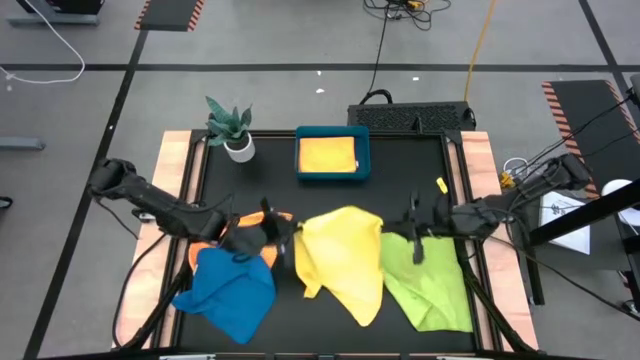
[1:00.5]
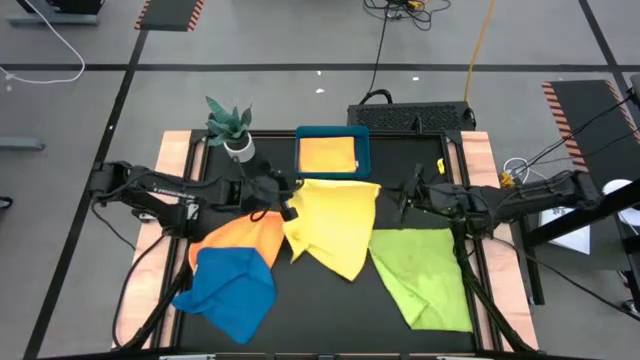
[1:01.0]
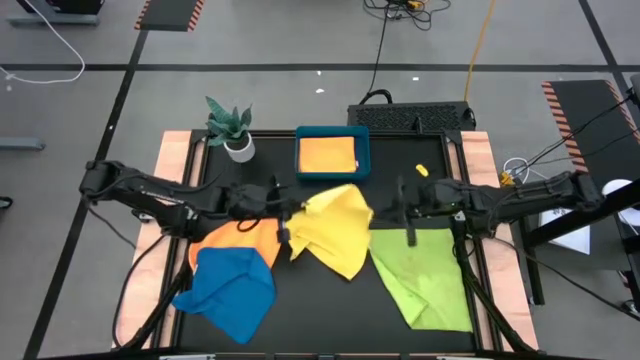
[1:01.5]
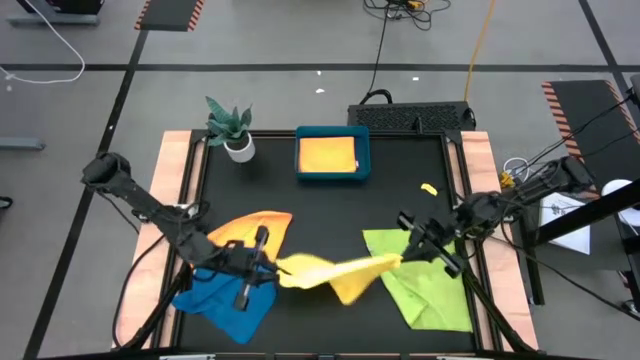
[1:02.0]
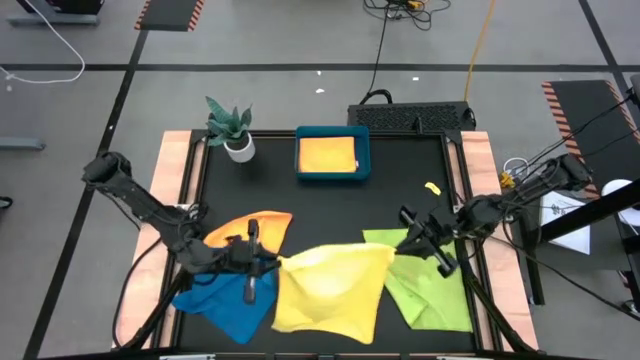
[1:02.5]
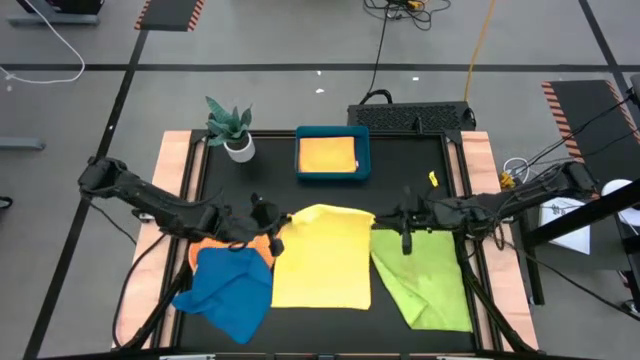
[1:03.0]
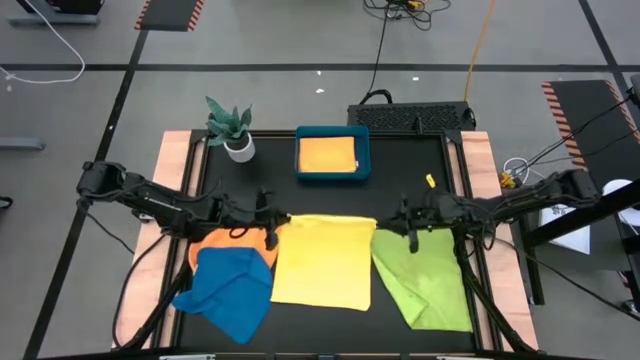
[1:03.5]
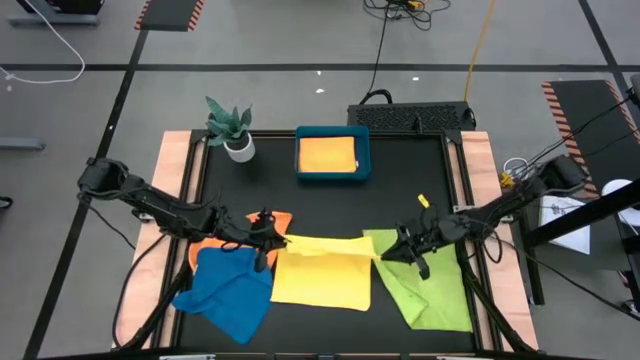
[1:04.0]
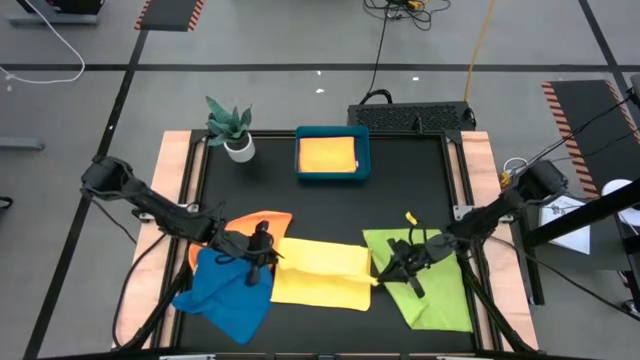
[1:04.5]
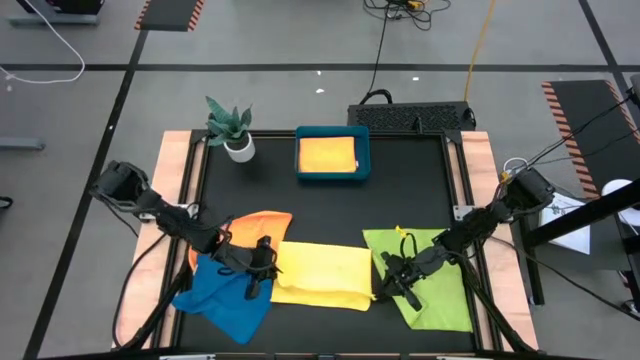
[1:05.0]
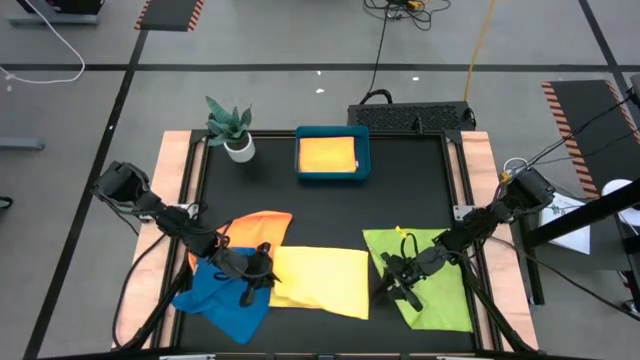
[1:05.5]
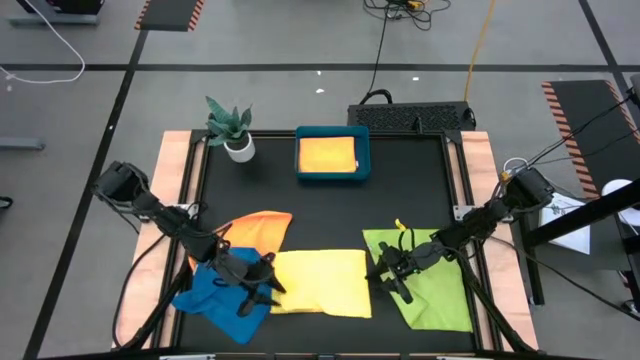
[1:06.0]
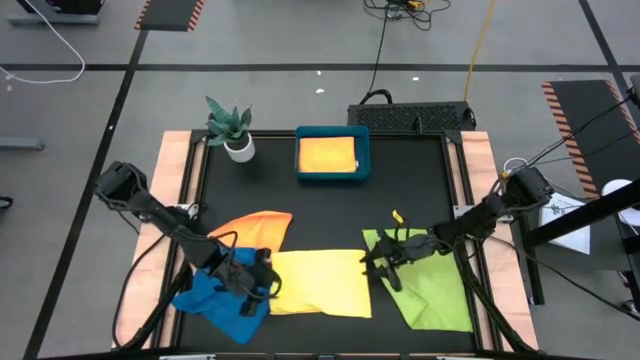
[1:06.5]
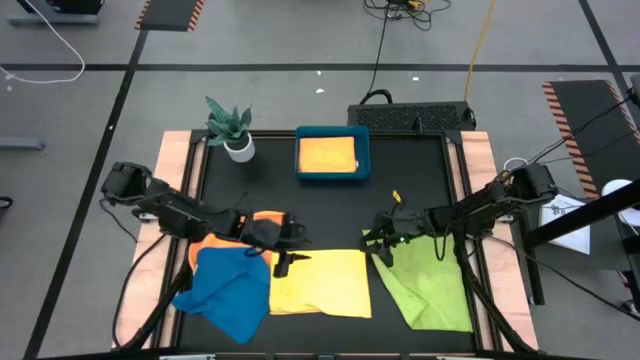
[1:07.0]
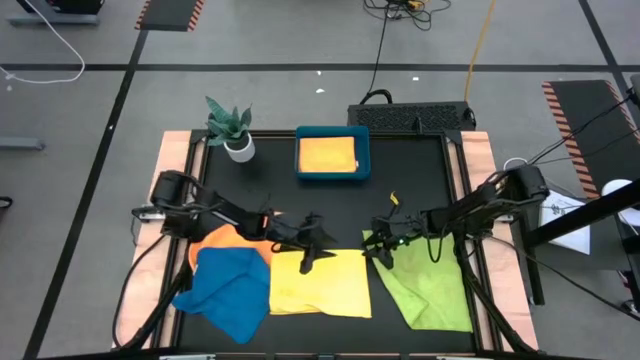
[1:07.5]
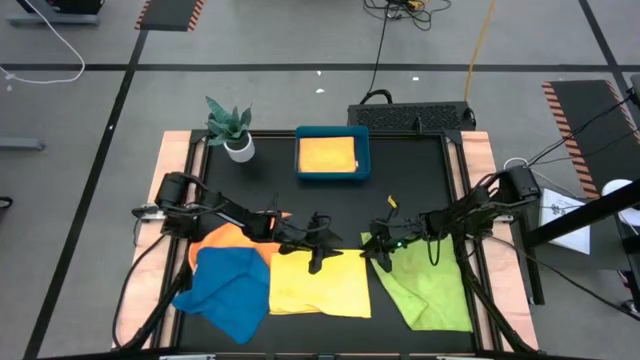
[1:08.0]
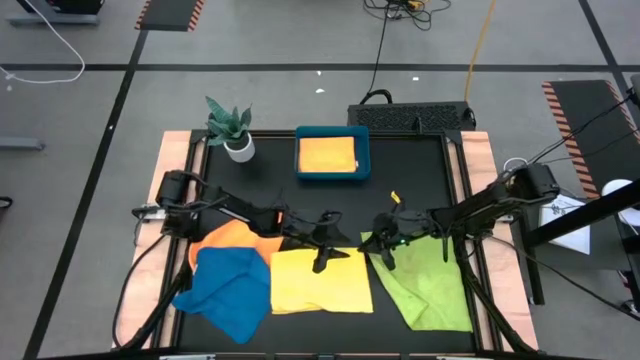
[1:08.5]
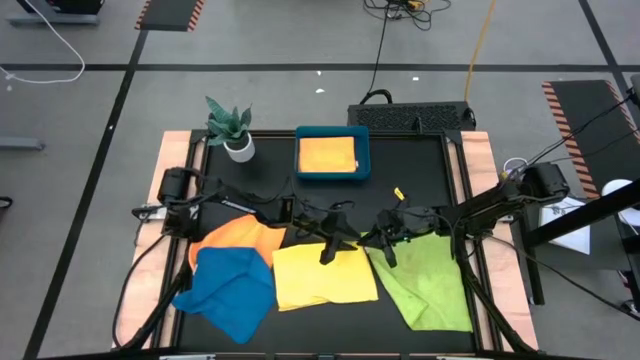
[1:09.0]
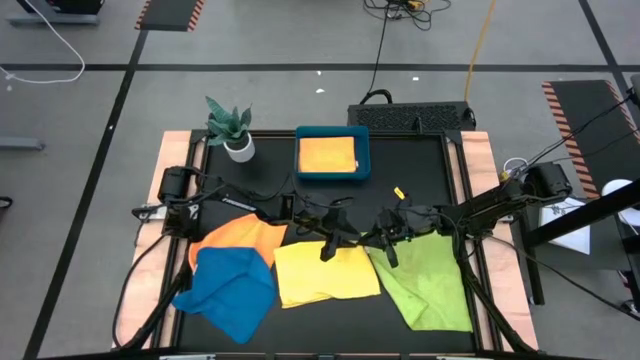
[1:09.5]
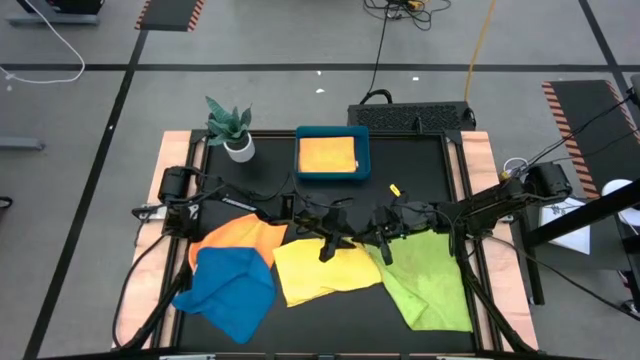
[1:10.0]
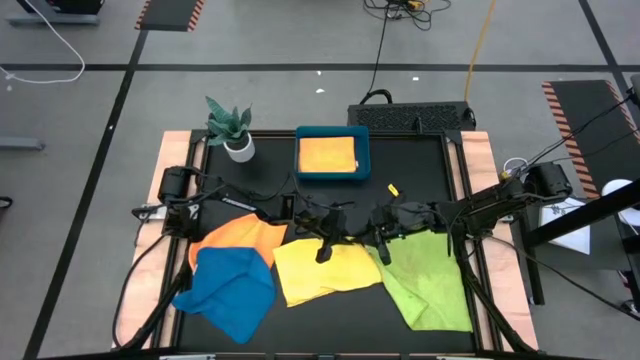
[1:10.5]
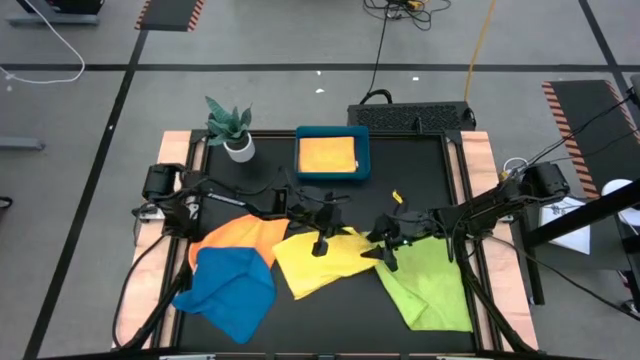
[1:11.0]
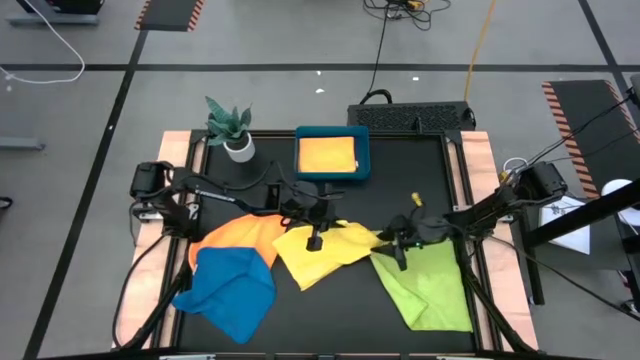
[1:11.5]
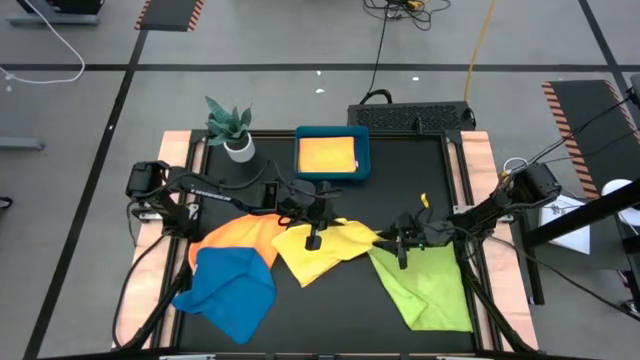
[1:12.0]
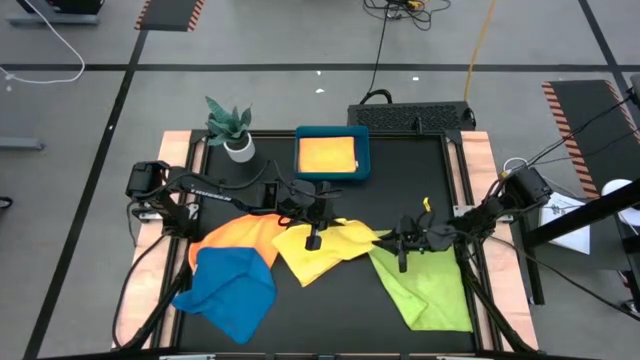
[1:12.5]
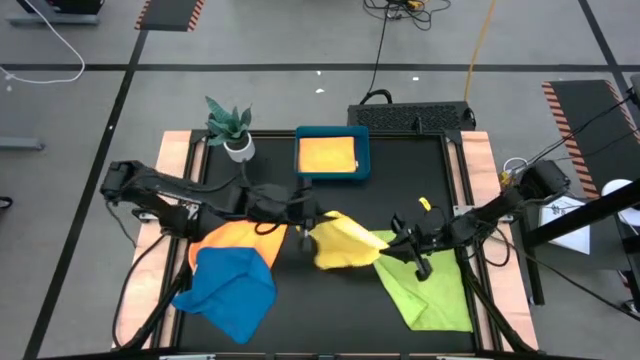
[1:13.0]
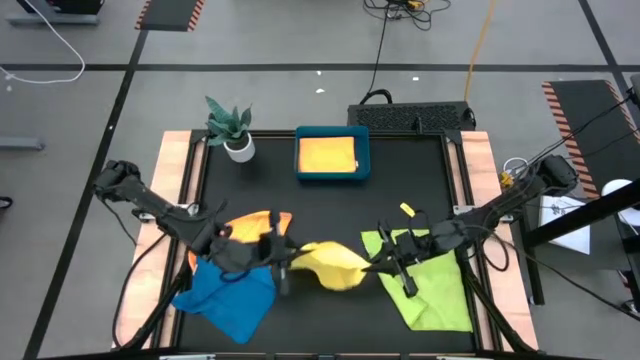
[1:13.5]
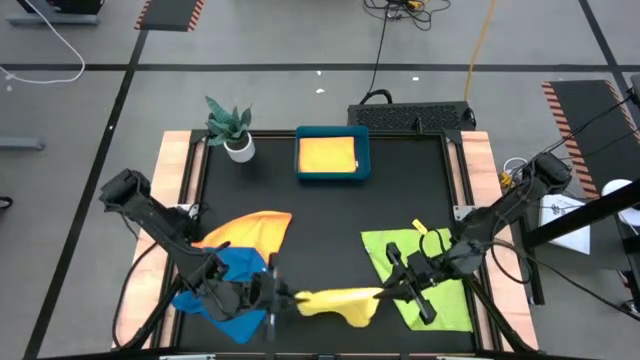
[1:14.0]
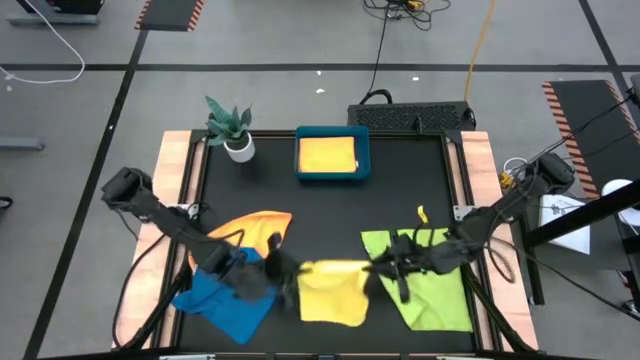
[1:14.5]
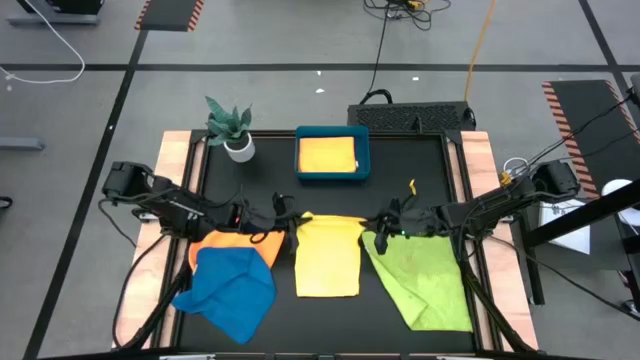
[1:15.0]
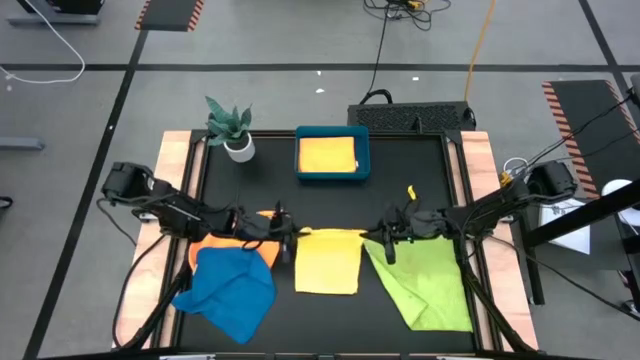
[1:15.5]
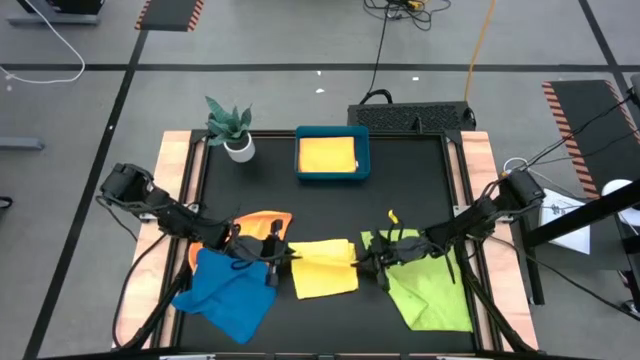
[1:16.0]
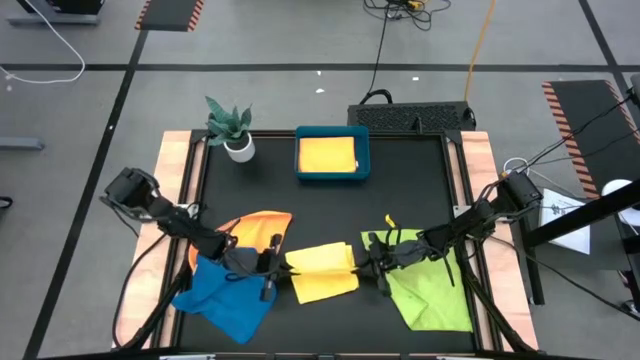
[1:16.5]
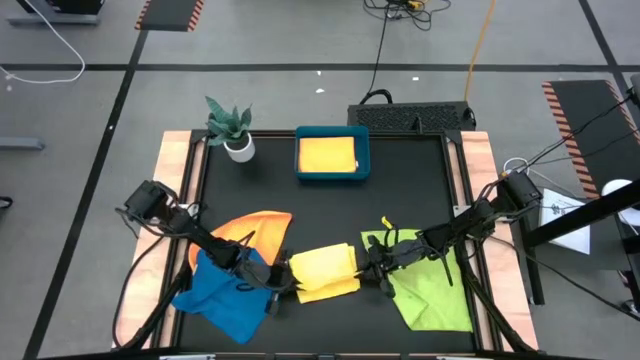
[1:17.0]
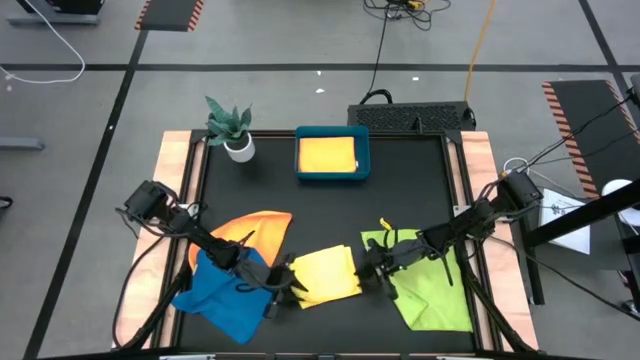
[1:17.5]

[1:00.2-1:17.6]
Task: Fold microfiber towels
Fold the yellow microfiber towel

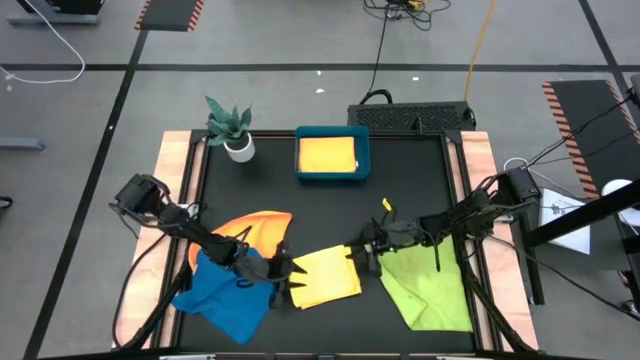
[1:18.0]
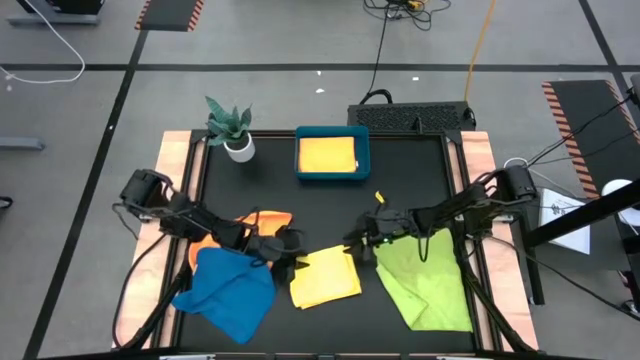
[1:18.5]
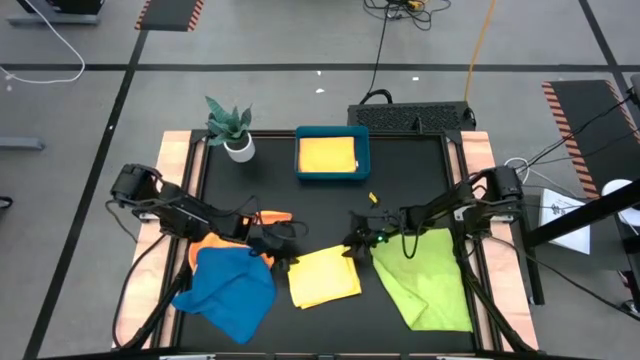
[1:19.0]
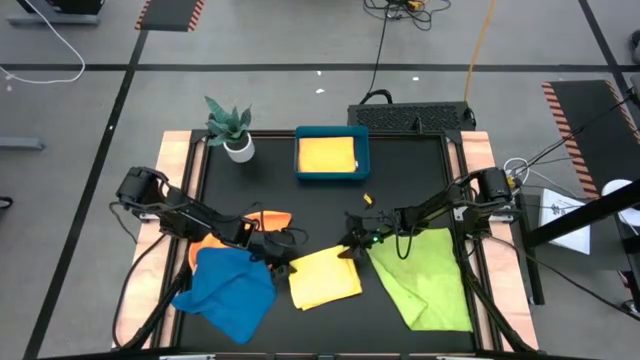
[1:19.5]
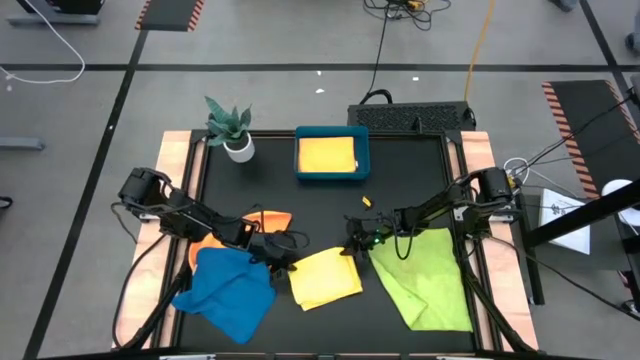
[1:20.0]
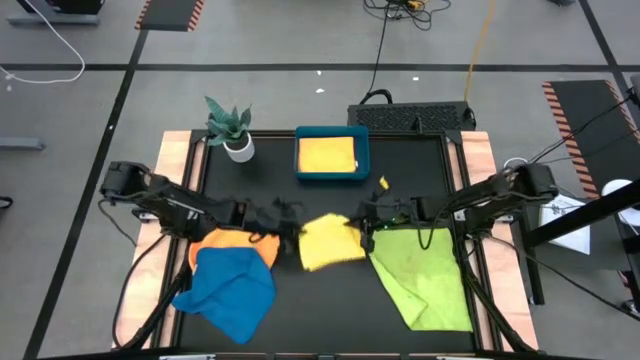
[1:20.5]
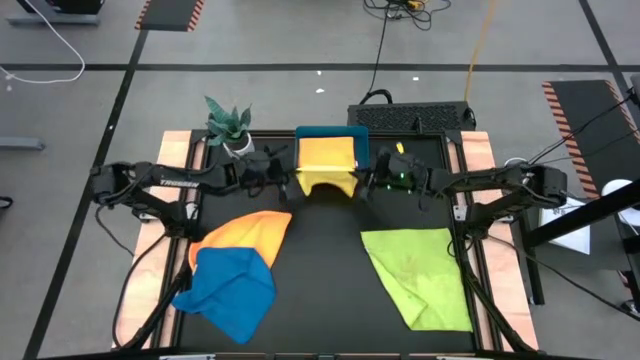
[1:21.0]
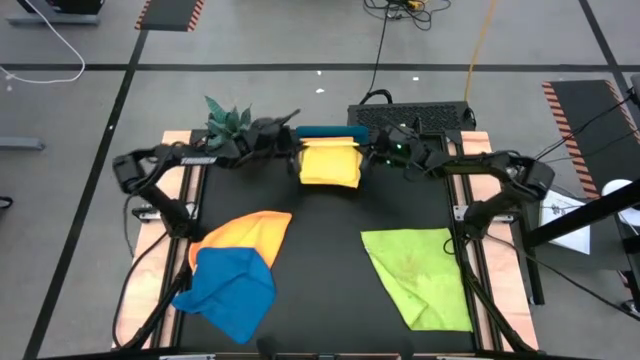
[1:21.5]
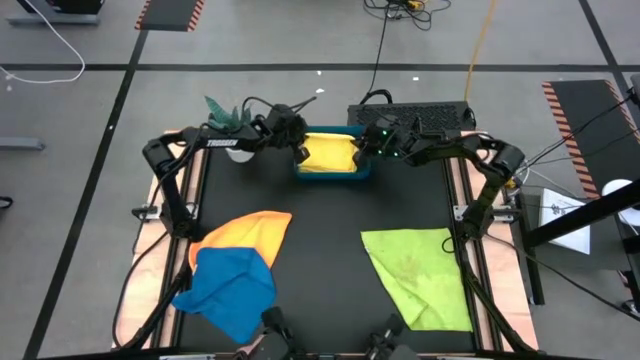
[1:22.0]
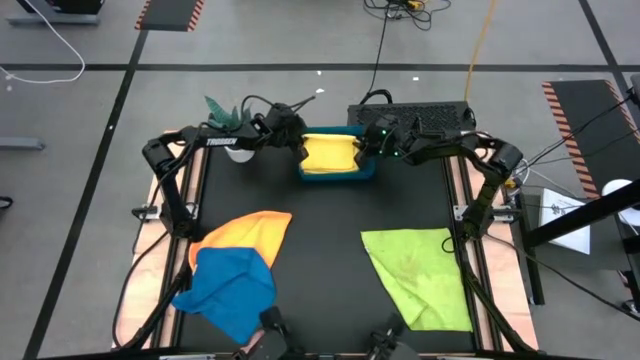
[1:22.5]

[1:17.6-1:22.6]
Put the folded yellow microfiber towel into the blue bin
